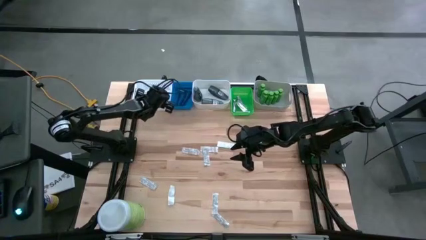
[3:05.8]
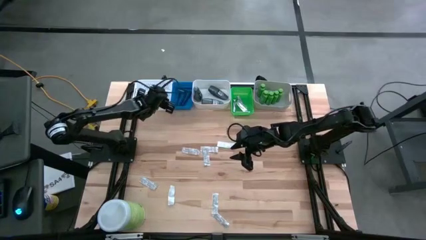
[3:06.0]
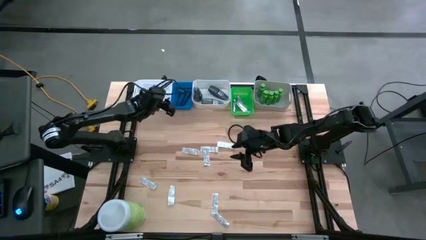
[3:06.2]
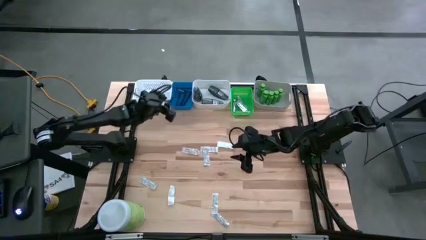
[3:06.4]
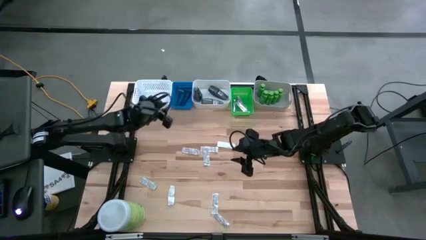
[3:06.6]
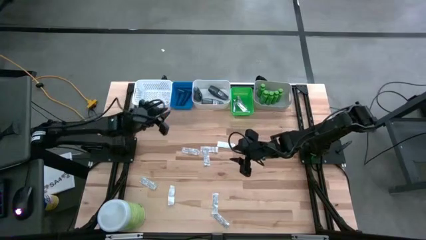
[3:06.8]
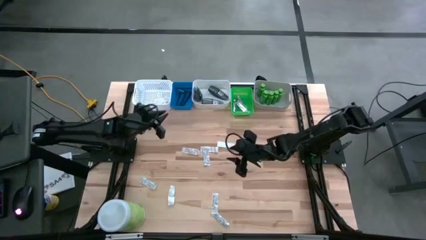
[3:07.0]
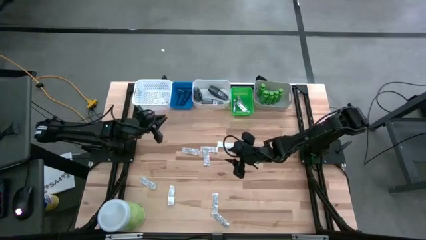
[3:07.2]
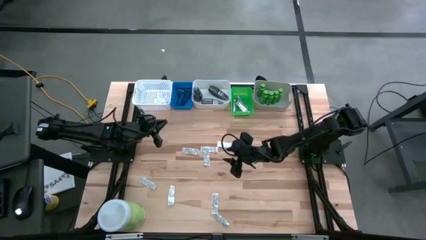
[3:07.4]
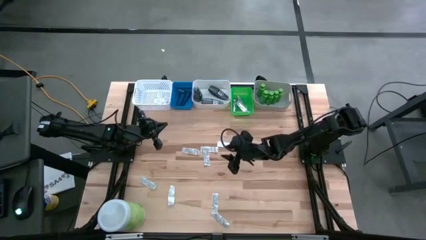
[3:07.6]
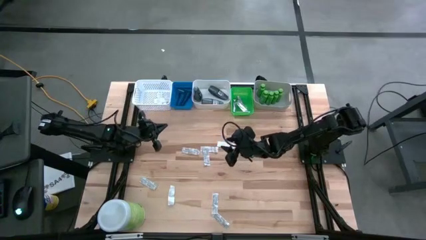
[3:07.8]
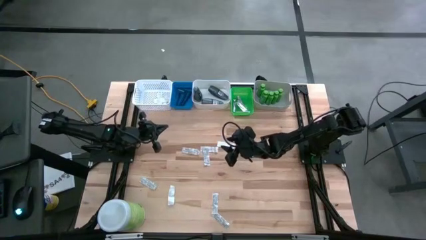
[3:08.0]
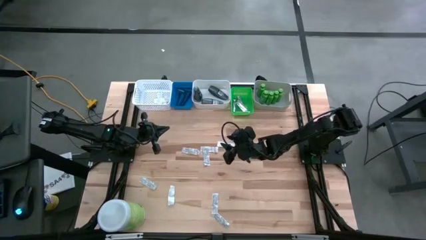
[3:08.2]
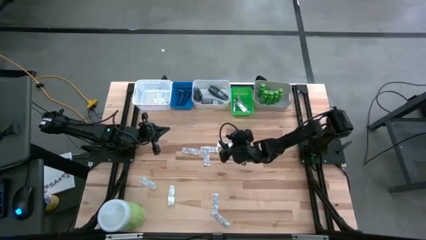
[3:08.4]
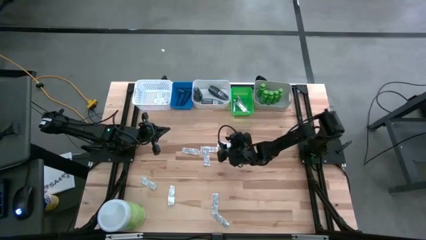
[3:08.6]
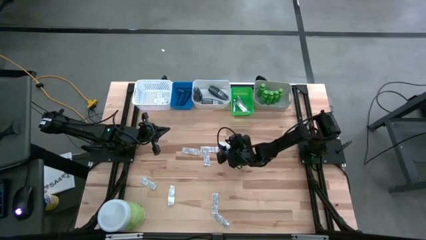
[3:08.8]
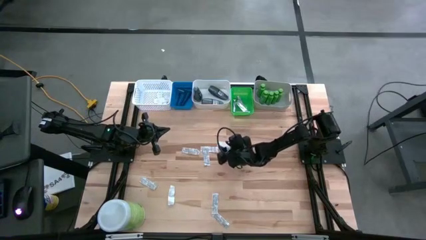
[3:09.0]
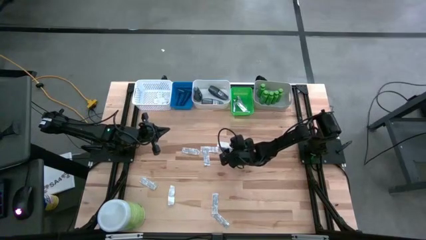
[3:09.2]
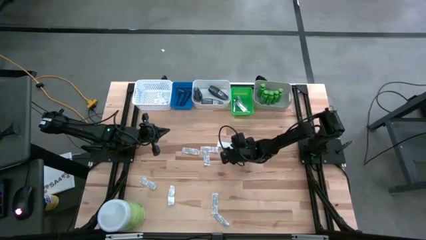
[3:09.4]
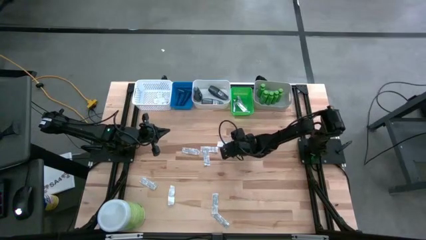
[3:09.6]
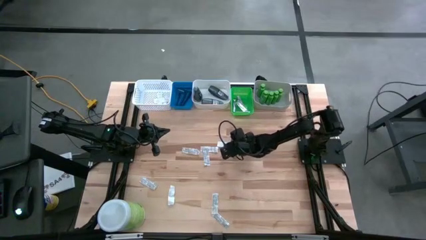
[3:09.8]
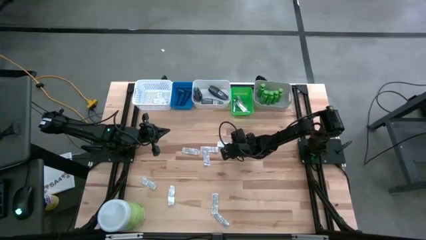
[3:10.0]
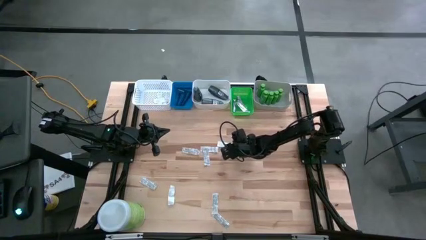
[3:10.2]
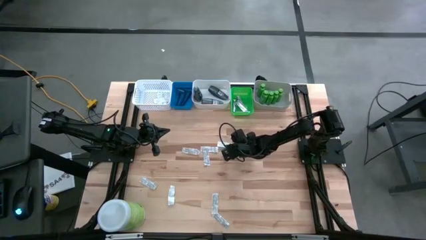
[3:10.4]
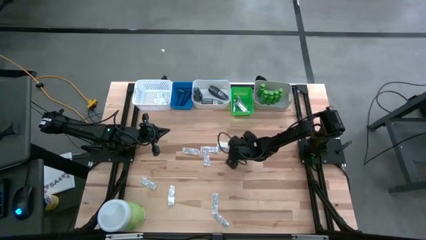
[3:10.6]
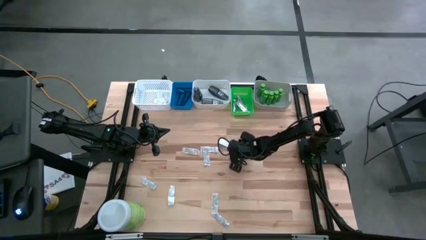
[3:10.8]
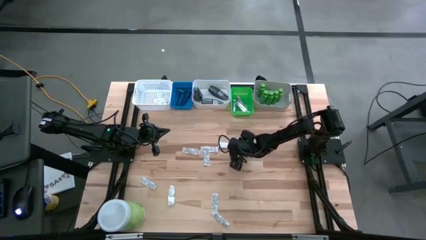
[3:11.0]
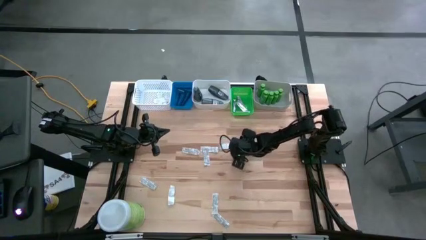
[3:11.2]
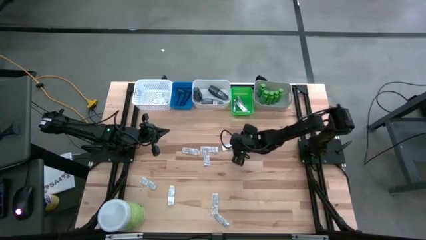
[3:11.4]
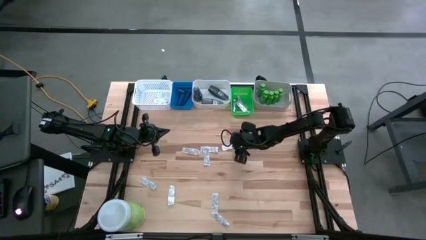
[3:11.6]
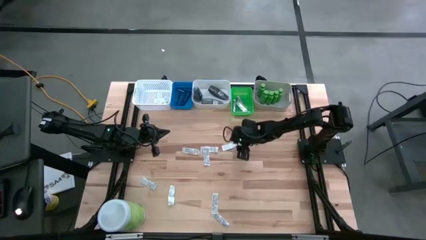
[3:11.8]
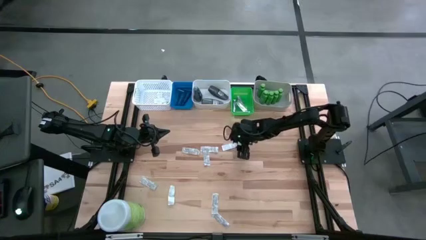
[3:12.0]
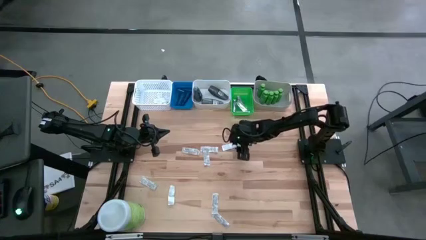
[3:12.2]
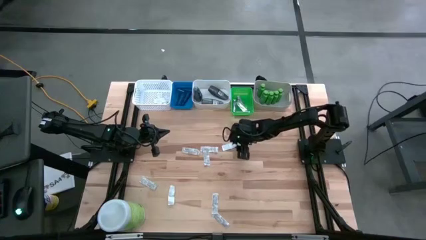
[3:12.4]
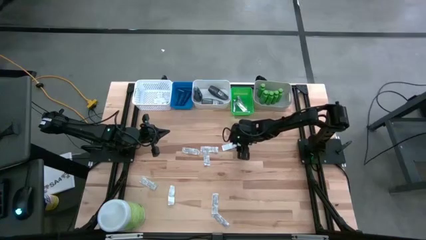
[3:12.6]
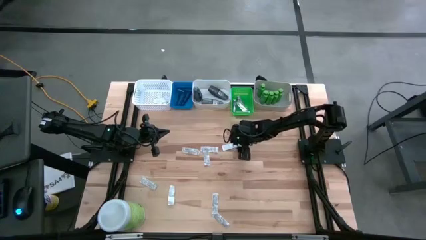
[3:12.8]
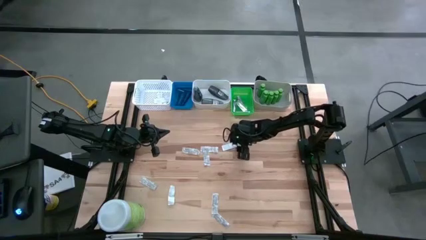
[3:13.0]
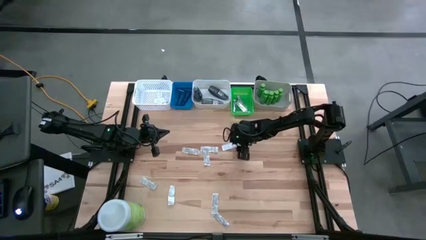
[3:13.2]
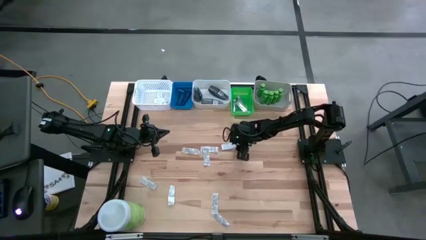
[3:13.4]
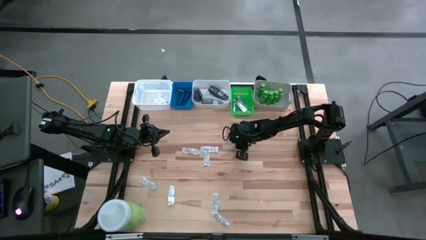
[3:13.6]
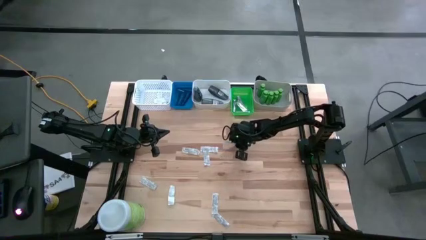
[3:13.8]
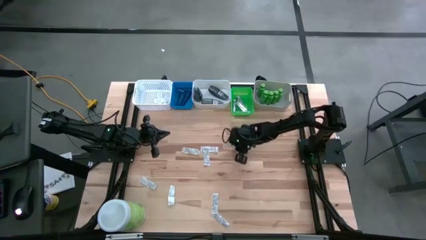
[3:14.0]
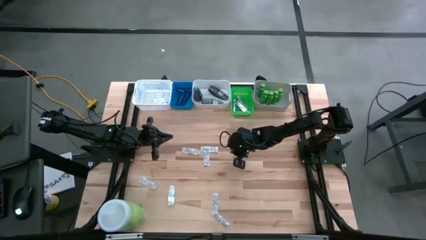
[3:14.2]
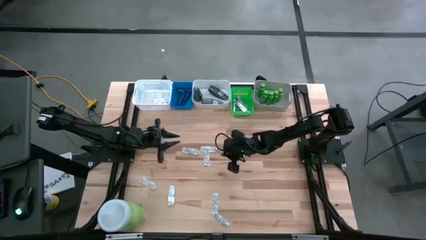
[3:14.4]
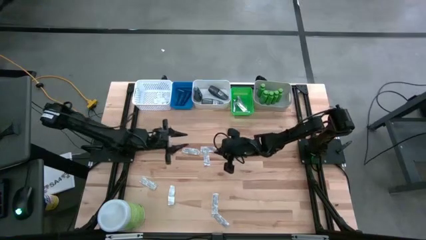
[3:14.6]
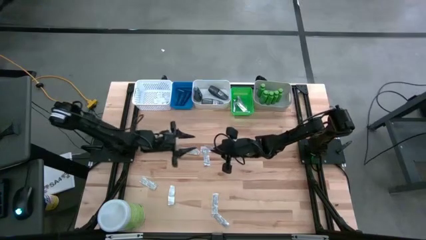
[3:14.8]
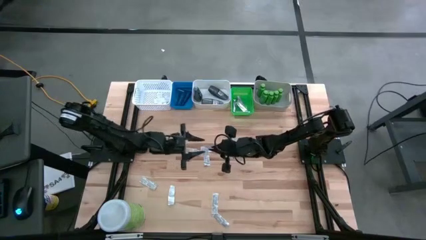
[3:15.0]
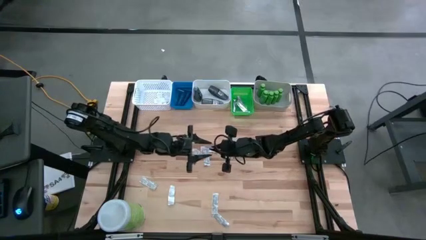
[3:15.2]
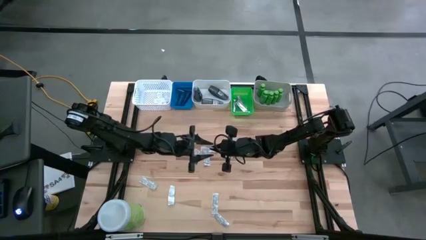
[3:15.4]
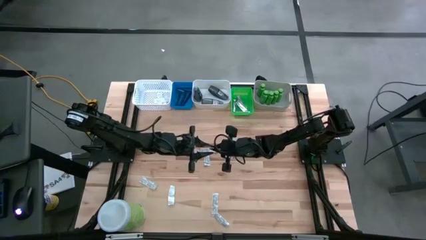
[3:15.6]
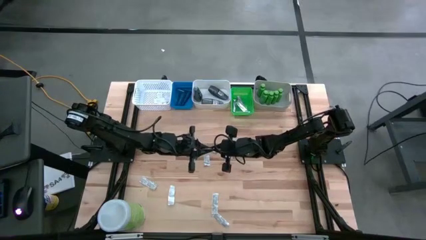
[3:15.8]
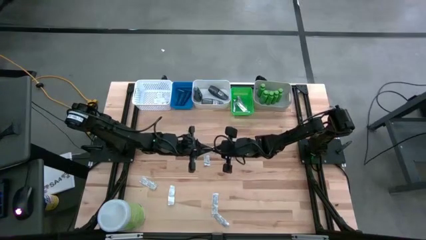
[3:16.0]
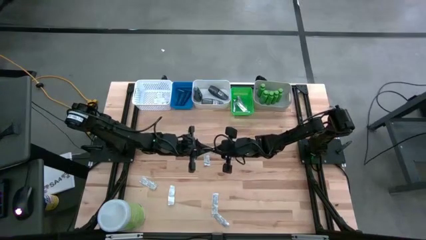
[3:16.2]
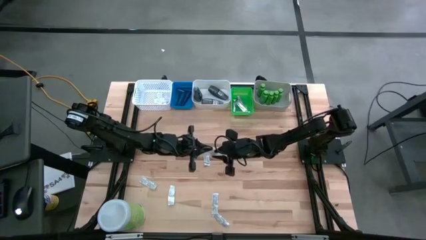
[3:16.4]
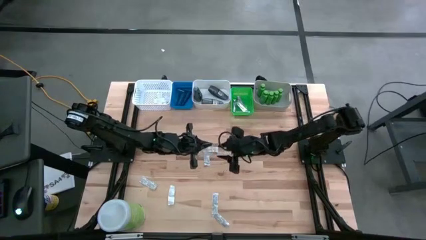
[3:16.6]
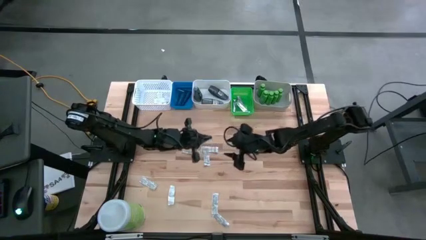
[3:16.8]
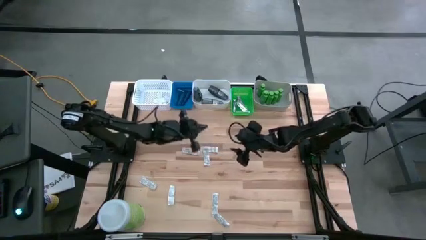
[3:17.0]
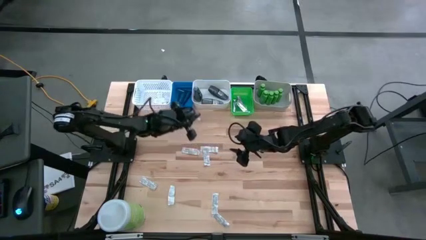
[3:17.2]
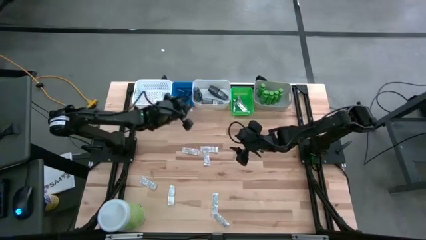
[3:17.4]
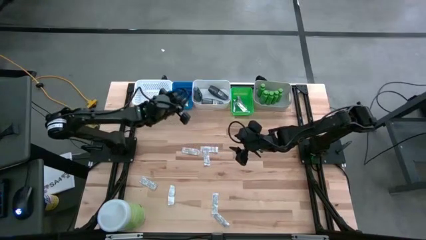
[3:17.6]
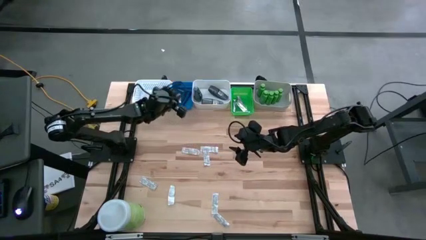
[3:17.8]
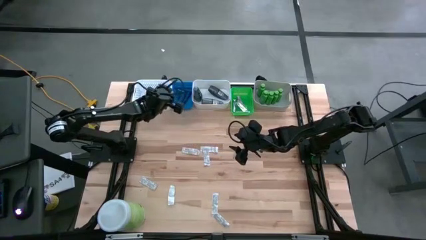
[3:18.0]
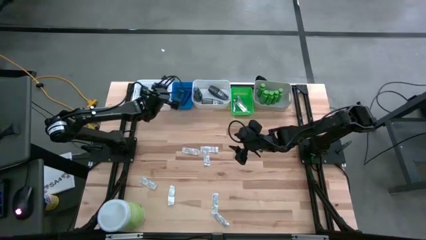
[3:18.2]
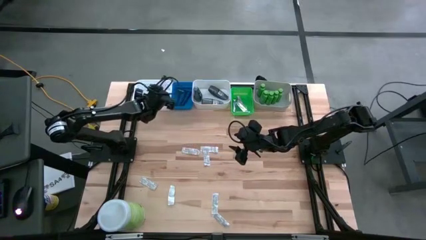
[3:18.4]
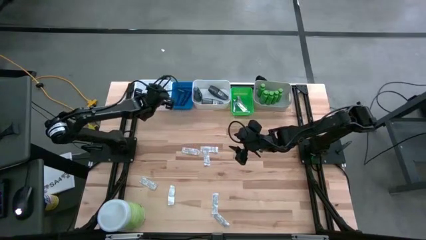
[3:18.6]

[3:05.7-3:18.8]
Task: Pick & Place Travel size toiletries
Put the bandage pack into the left white bin

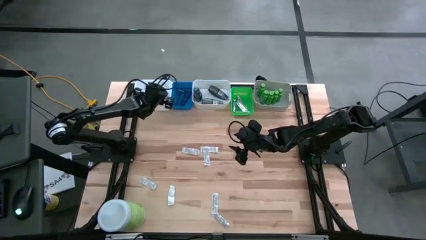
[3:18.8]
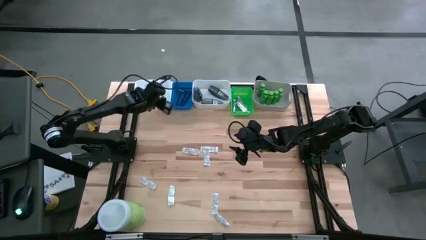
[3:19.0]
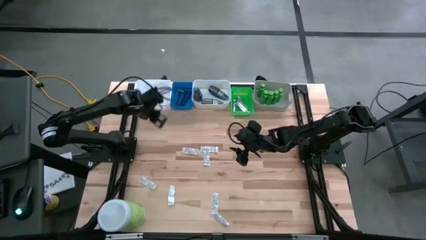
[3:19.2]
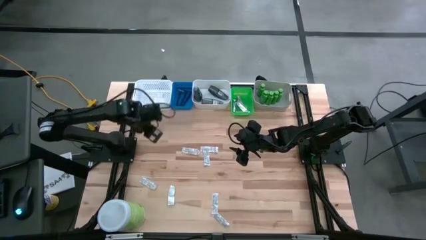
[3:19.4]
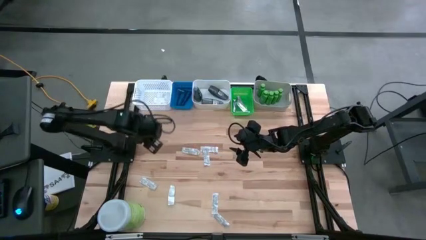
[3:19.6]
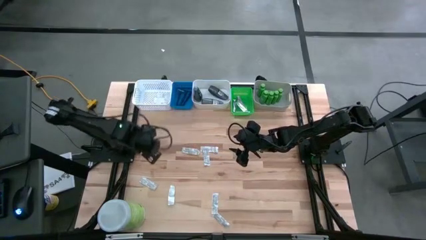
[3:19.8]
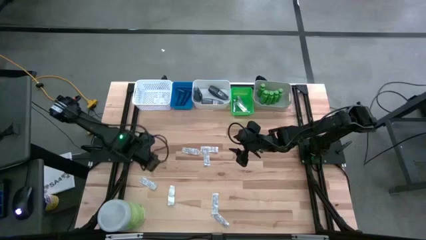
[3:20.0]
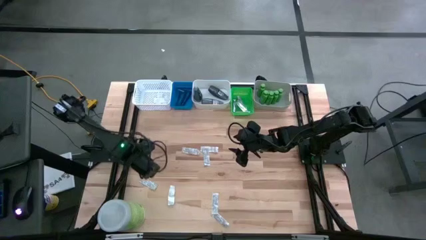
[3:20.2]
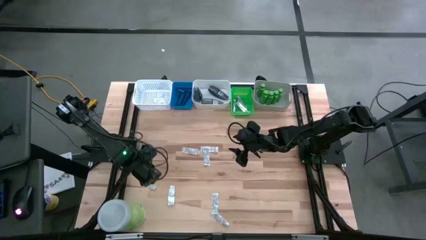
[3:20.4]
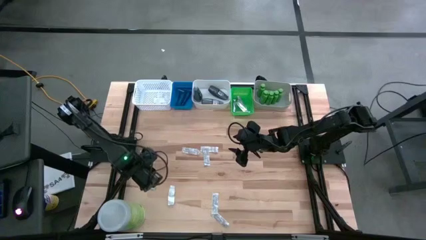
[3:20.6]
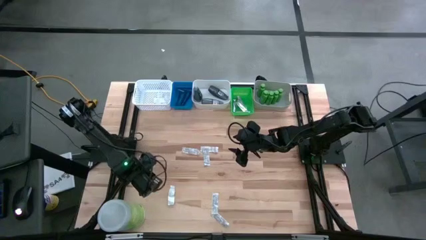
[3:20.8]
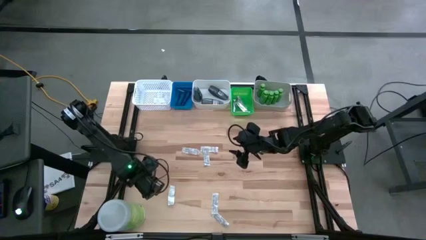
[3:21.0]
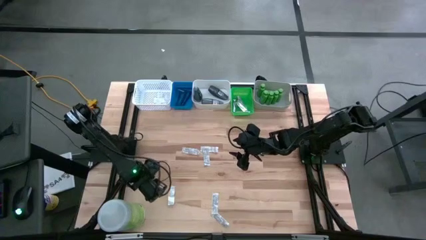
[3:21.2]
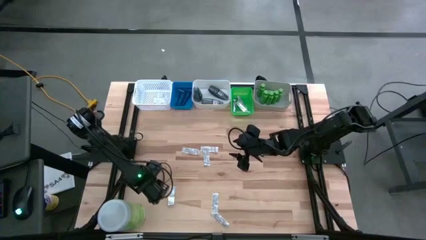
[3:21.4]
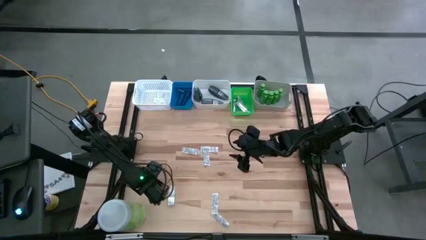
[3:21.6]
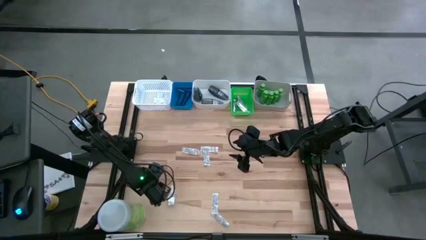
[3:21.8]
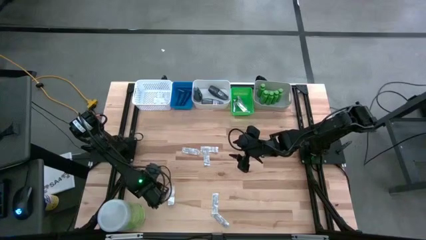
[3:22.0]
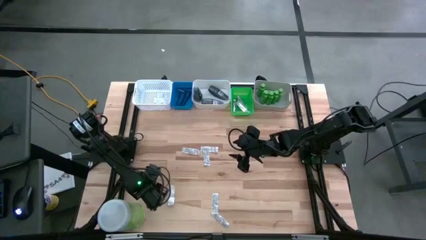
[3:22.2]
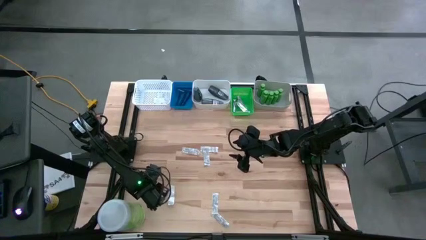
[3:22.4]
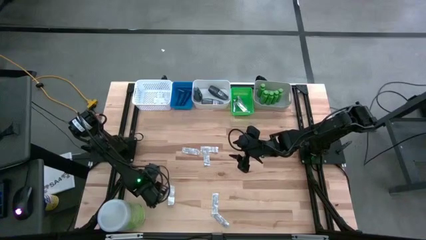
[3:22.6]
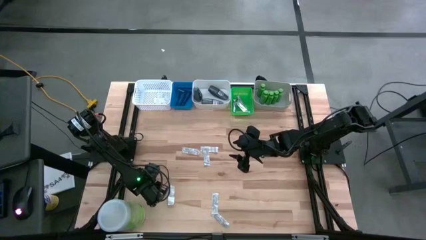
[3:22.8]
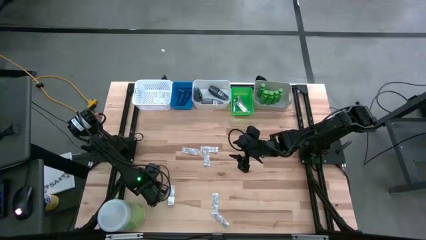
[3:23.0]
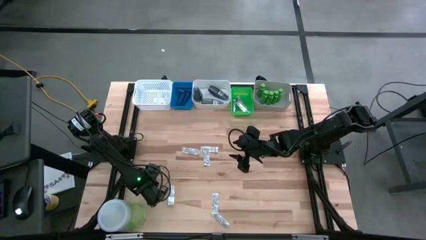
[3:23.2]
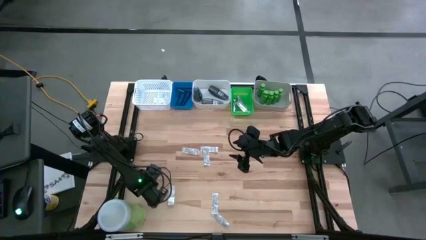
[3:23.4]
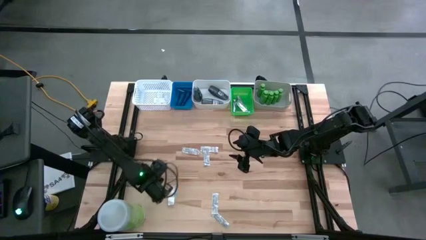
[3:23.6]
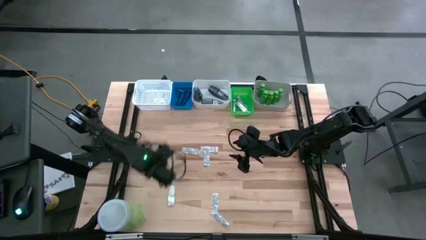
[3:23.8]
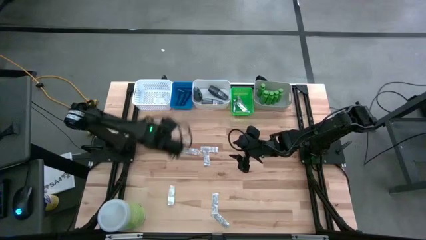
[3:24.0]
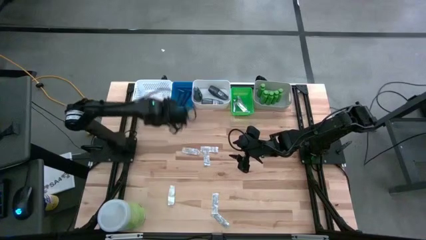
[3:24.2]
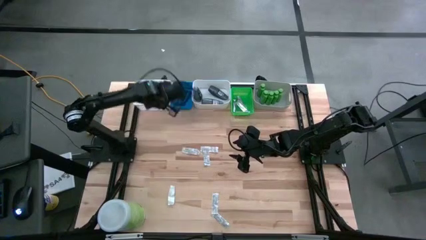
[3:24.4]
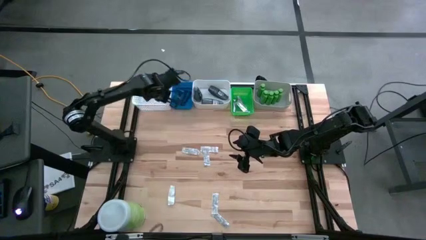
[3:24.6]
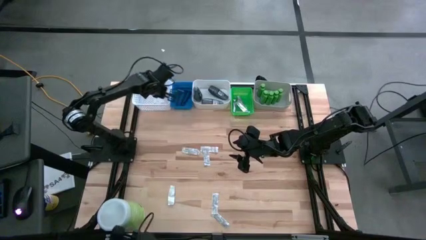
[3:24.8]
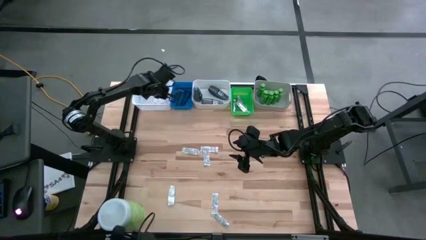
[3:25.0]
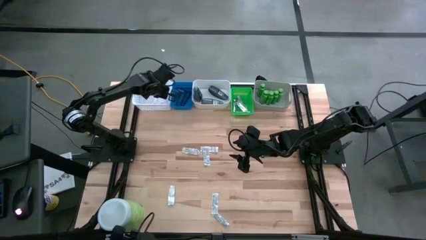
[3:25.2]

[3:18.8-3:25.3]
Put the bandage pack into the left white bin
